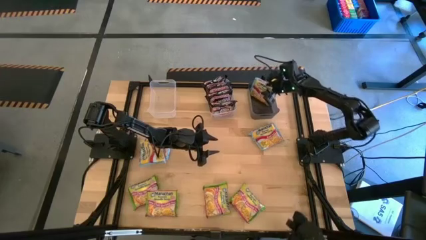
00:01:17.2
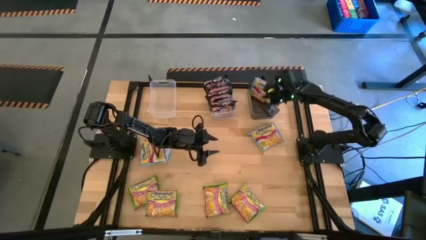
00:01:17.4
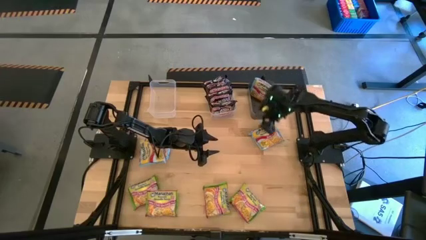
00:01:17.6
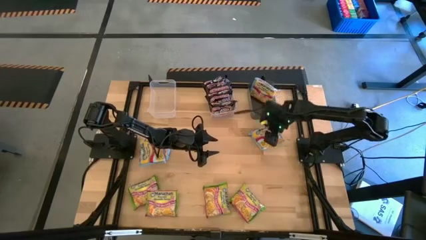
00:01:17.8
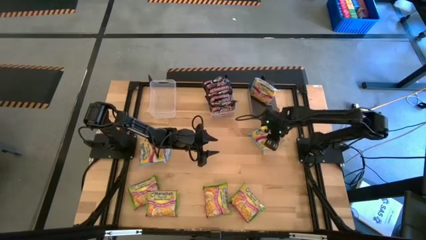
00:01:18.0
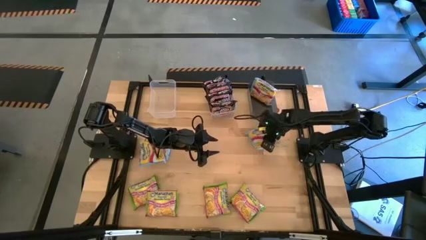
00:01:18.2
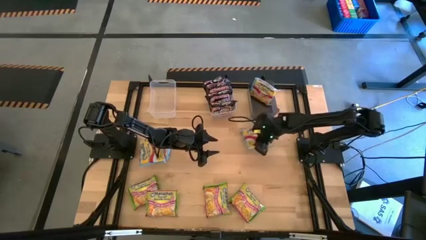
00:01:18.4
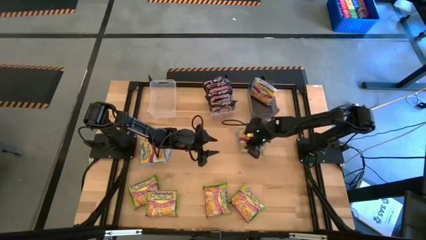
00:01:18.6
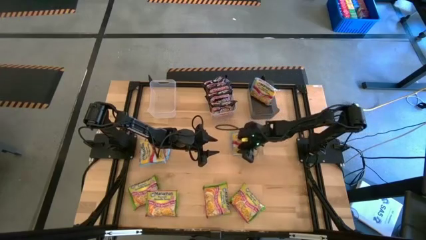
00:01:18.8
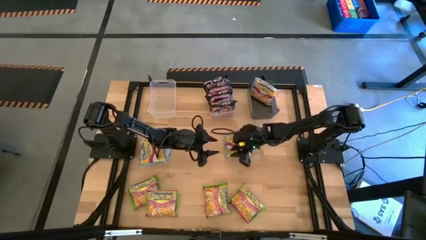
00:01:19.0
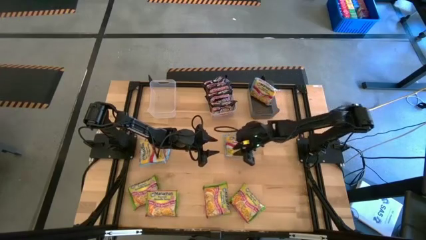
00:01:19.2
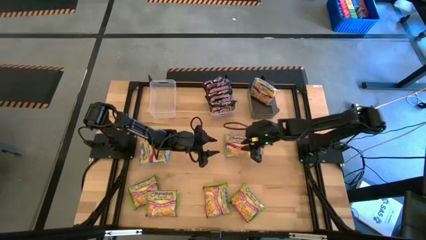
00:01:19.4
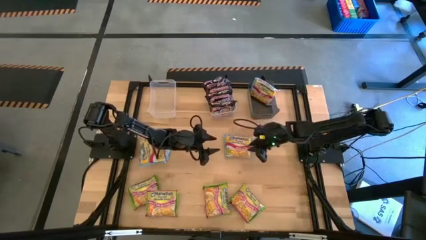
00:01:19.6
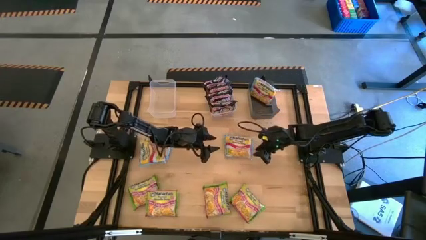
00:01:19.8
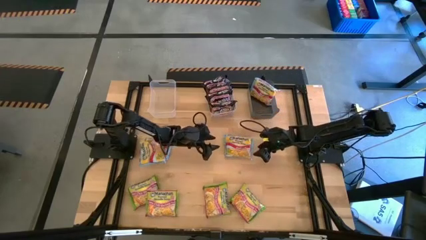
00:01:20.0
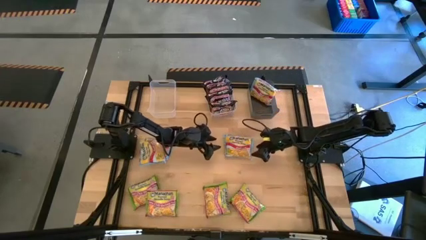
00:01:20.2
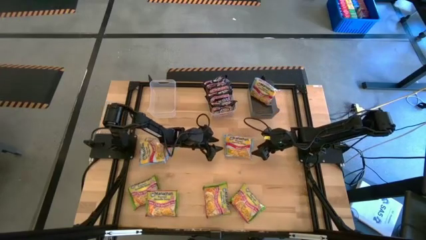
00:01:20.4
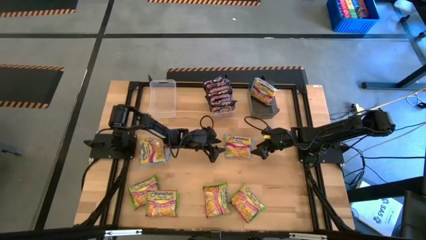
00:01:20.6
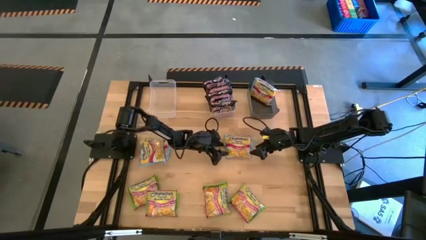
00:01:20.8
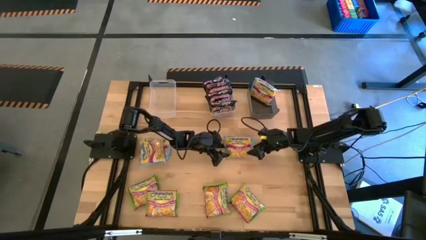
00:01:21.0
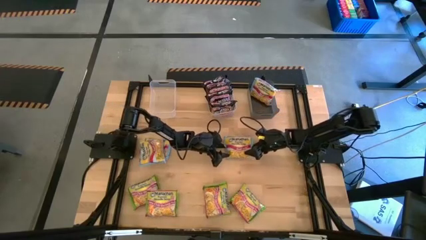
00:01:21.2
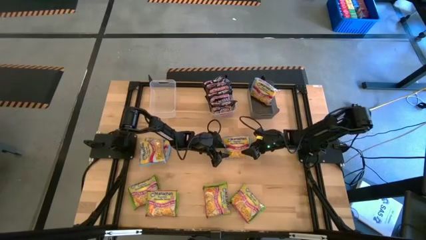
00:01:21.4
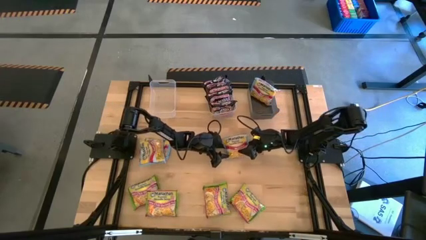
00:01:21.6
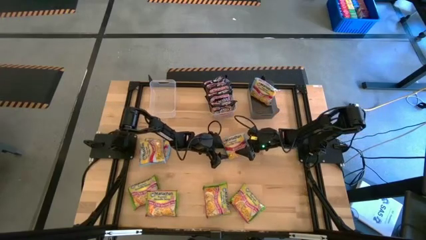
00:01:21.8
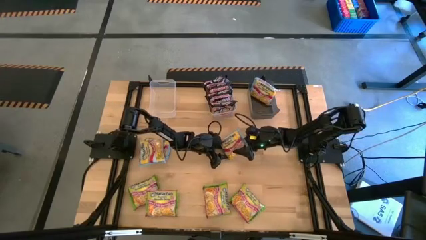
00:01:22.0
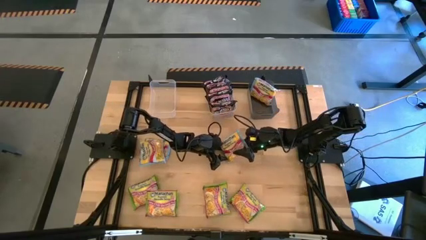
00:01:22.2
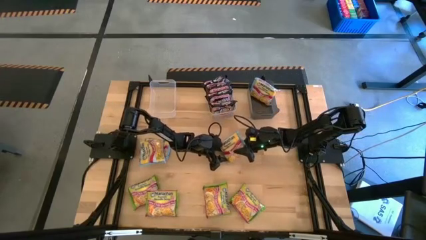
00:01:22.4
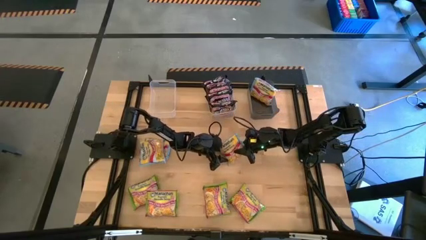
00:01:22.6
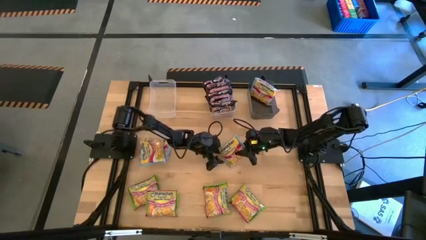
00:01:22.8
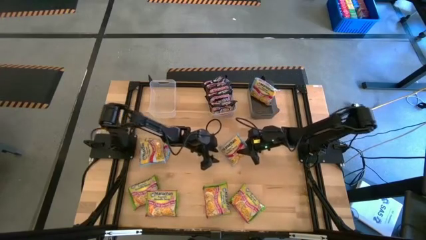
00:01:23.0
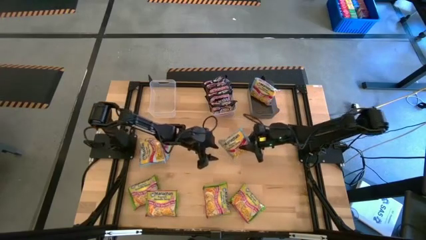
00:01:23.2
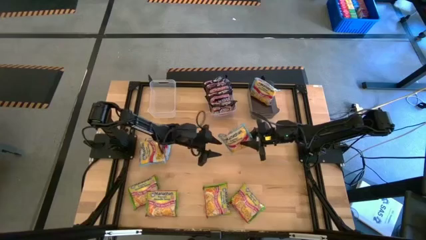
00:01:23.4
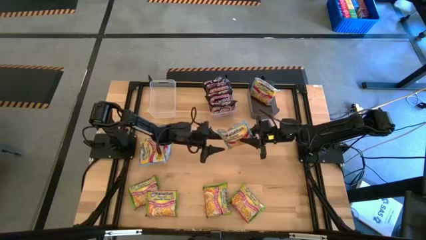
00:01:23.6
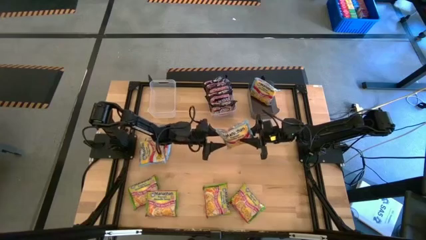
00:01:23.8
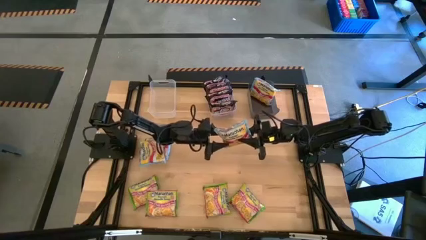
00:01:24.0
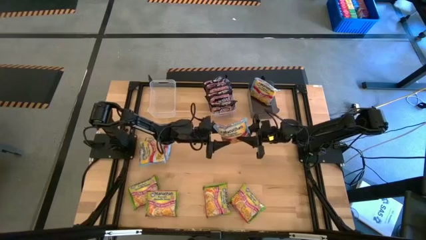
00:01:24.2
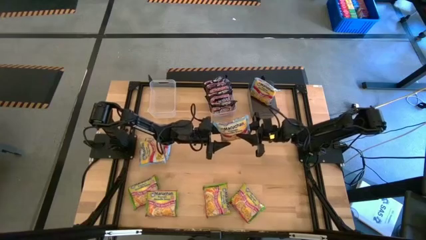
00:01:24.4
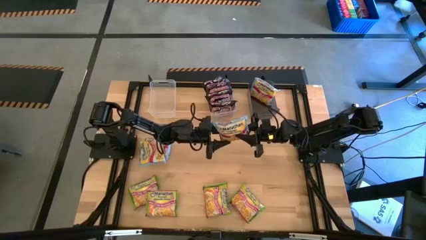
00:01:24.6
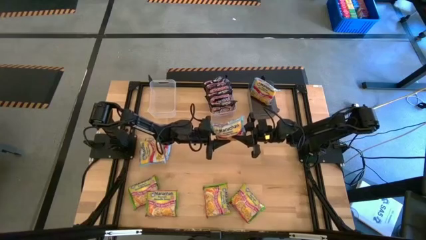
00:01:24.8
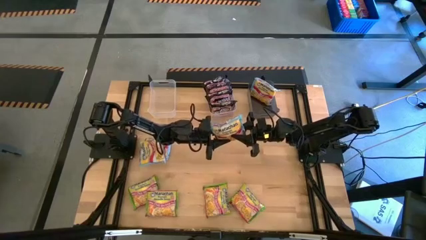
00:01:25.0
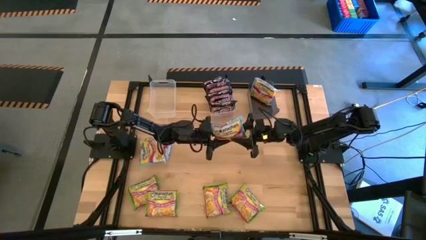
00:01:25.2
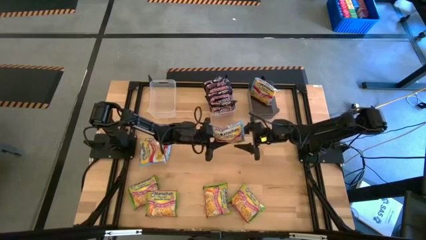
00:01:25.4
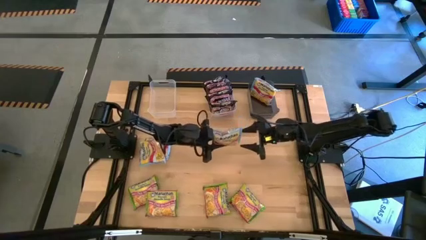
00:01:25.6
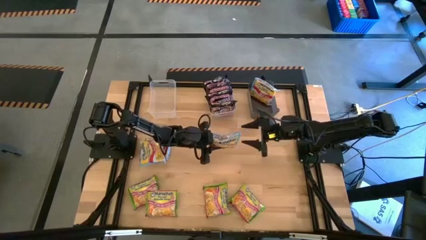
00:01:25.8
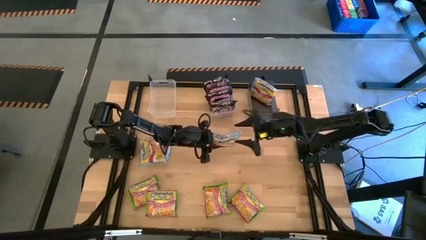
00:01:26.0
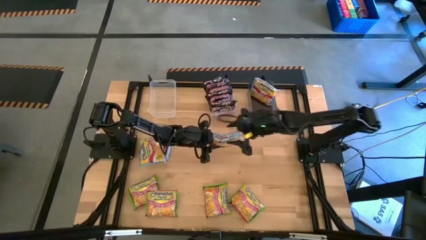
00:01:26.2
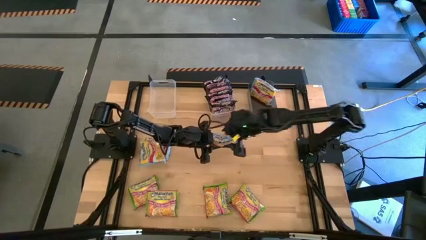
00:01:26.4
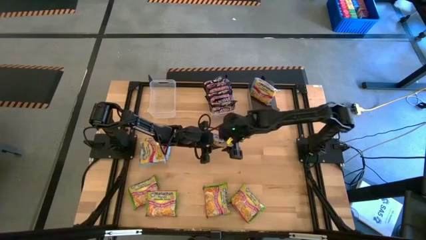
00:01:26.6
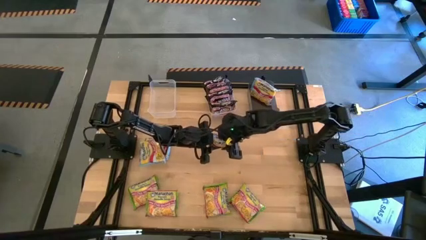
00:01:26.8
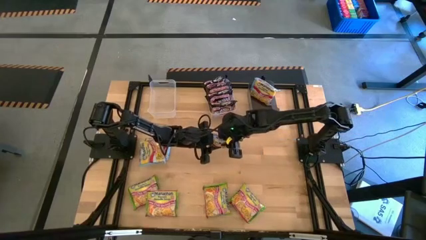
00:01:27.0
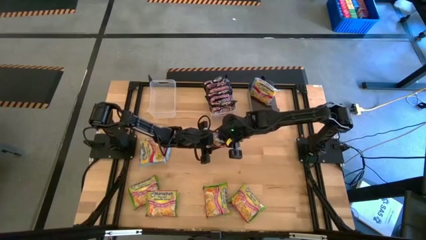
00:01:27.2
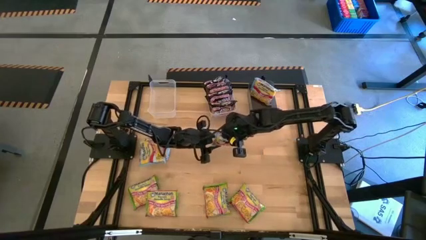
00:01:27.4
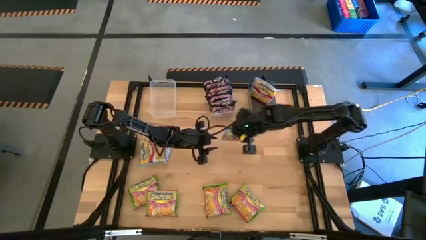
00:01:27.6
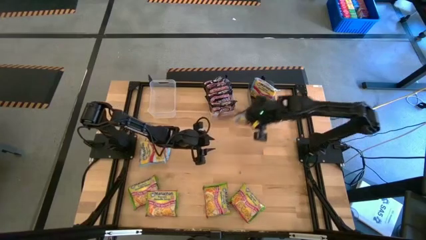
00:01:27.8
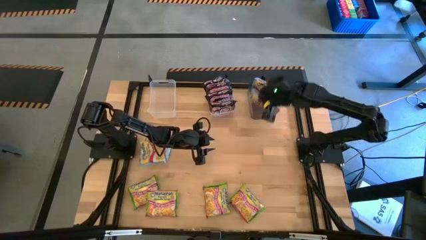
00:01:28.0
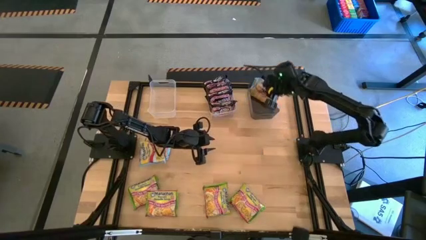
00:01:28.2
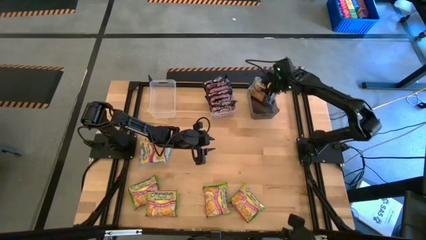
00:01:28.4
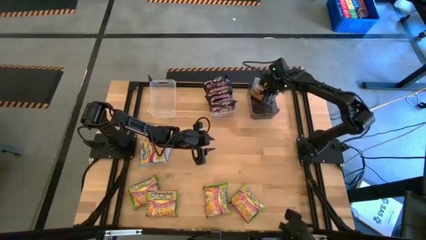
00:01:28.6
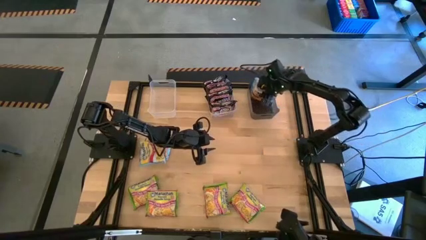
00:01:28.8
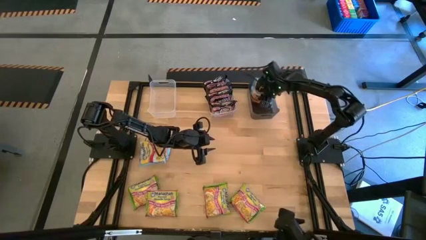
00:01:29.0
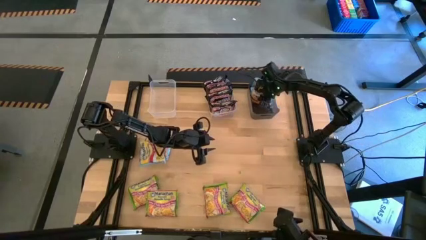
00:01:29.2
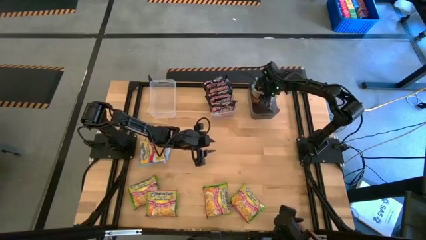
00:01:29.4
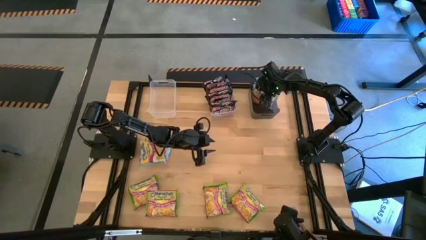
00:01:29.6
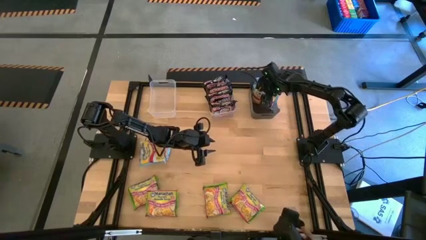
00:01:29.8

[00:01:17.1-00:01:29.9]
Task: Sort Maruchan noodles
Put the blue noodle pack into the black bin
